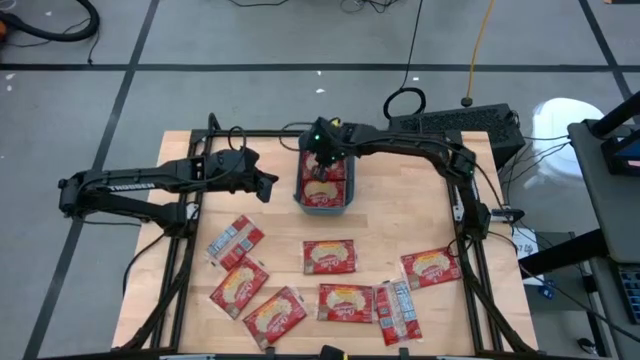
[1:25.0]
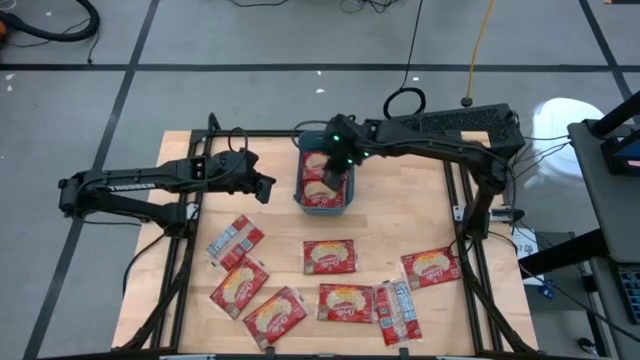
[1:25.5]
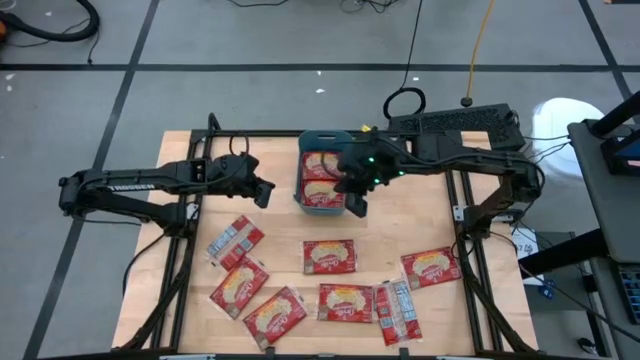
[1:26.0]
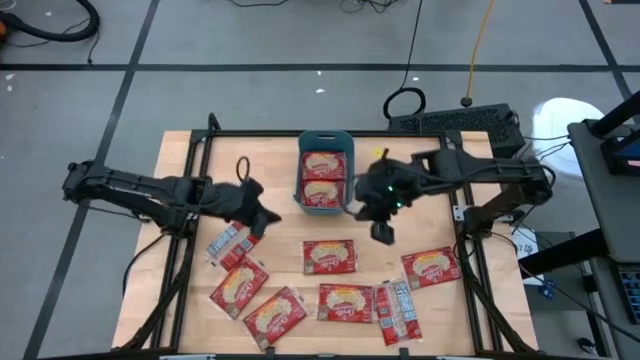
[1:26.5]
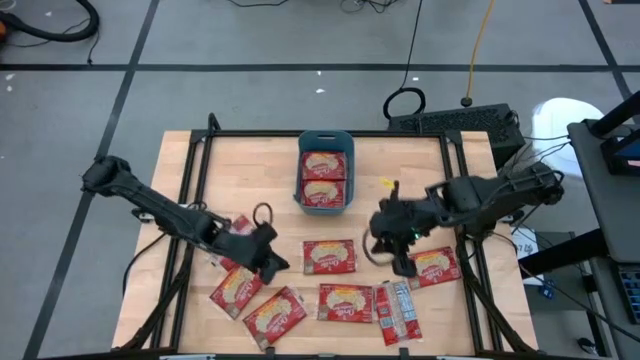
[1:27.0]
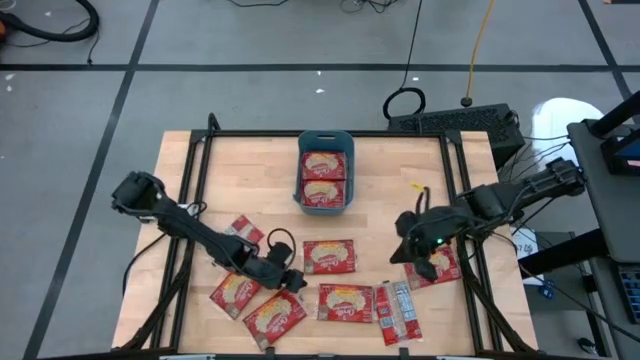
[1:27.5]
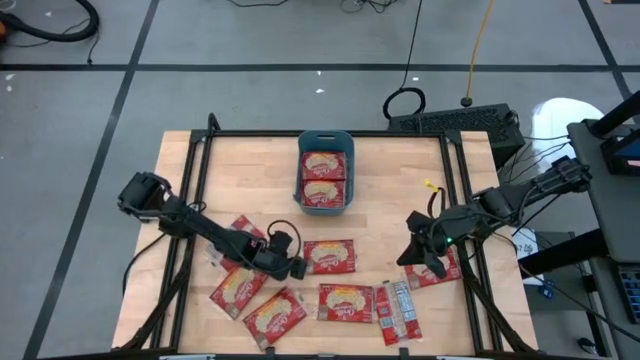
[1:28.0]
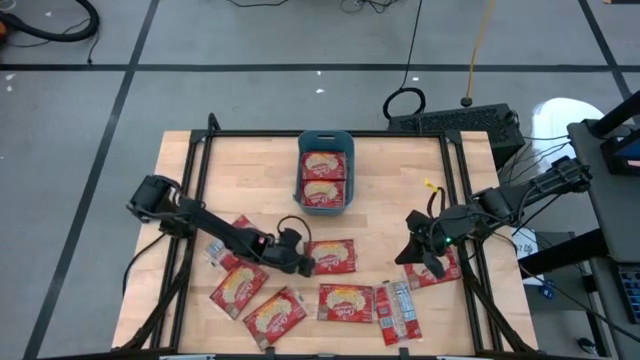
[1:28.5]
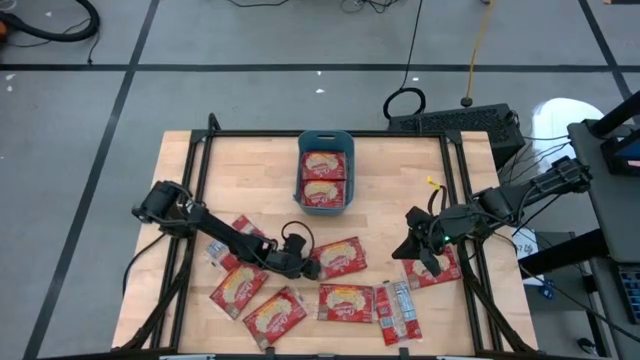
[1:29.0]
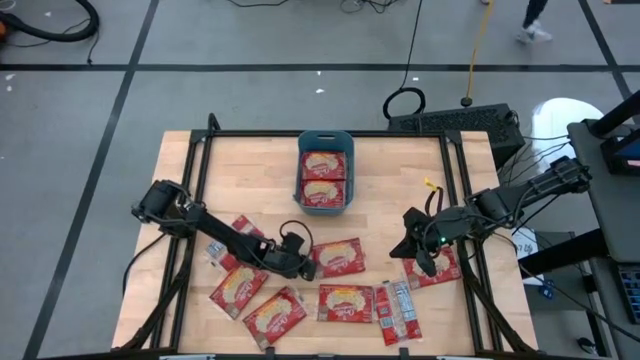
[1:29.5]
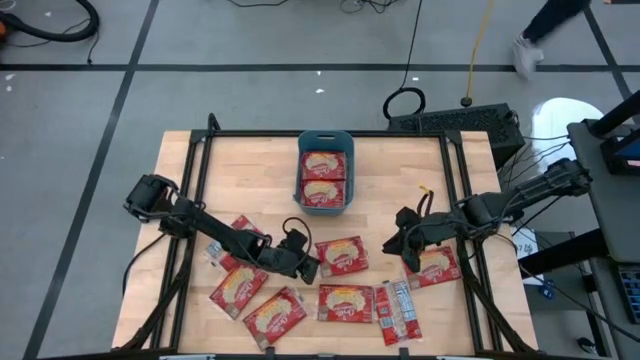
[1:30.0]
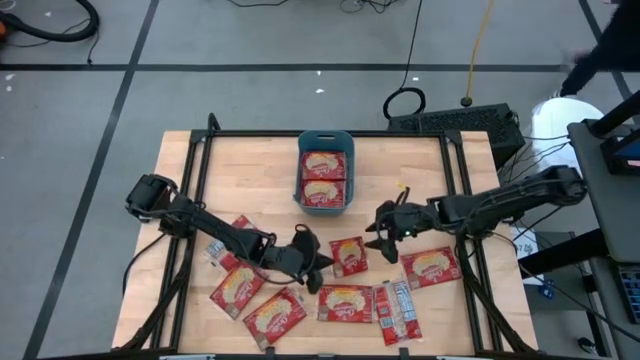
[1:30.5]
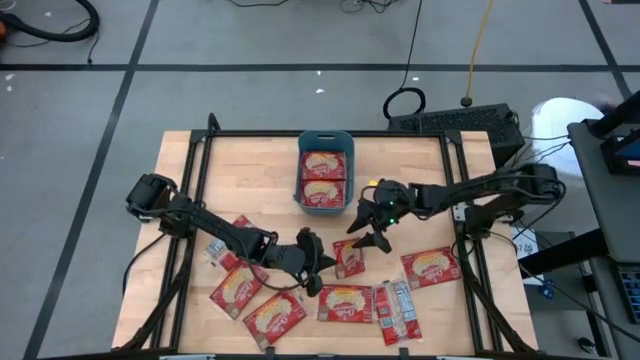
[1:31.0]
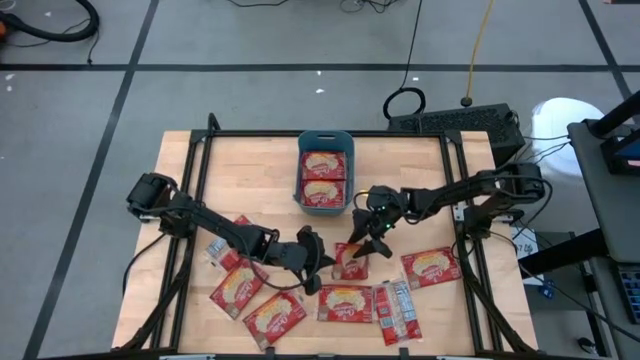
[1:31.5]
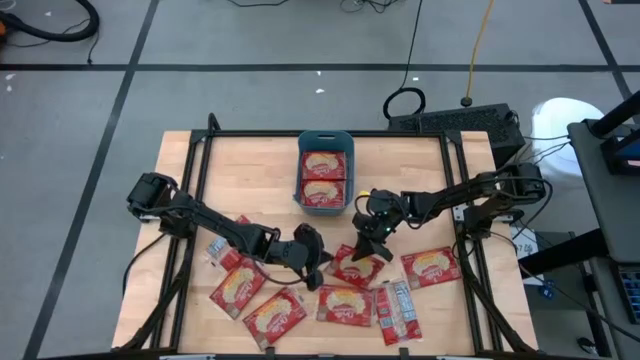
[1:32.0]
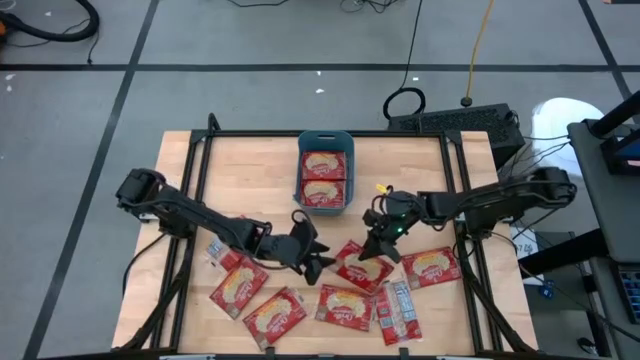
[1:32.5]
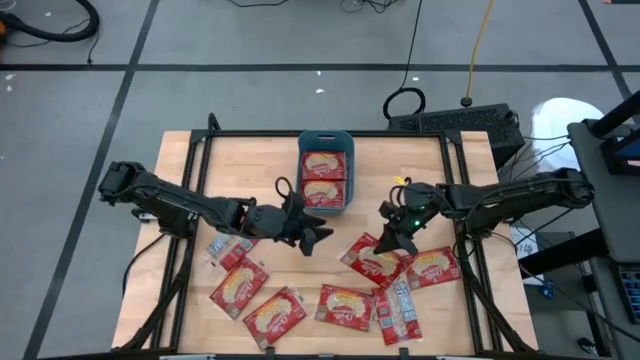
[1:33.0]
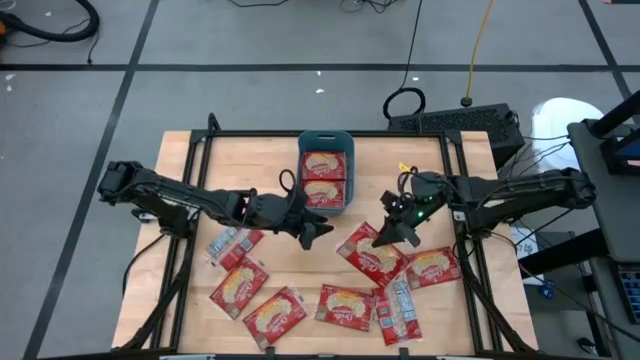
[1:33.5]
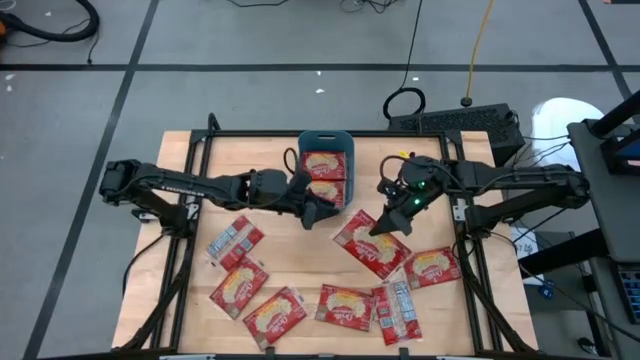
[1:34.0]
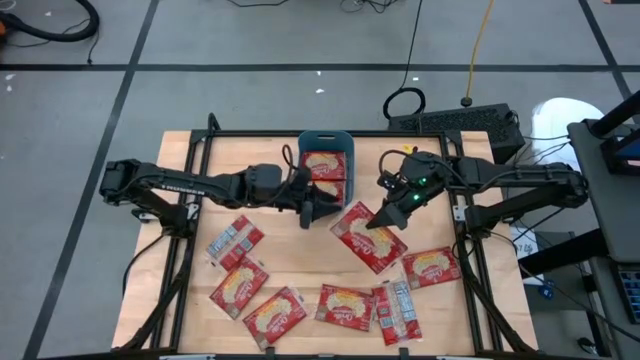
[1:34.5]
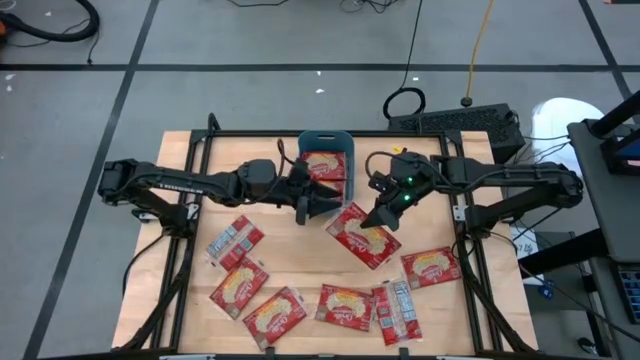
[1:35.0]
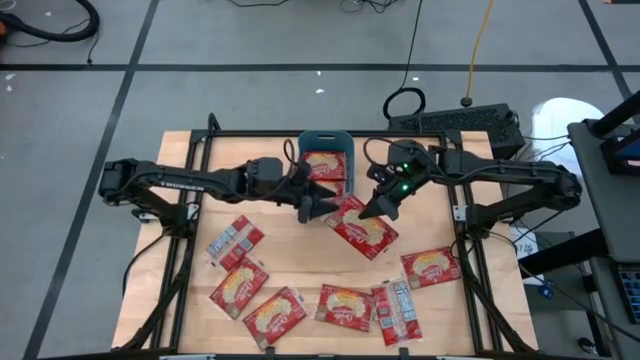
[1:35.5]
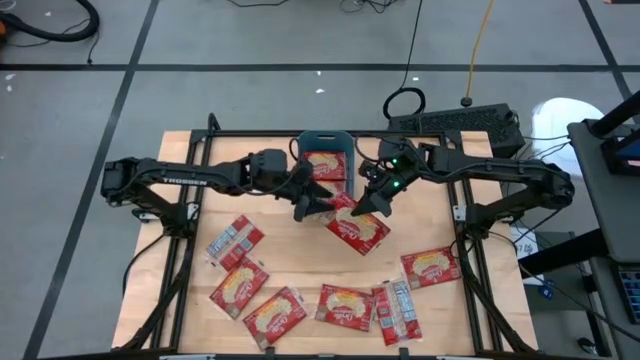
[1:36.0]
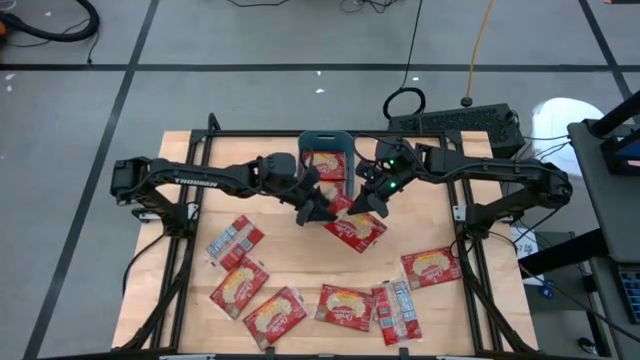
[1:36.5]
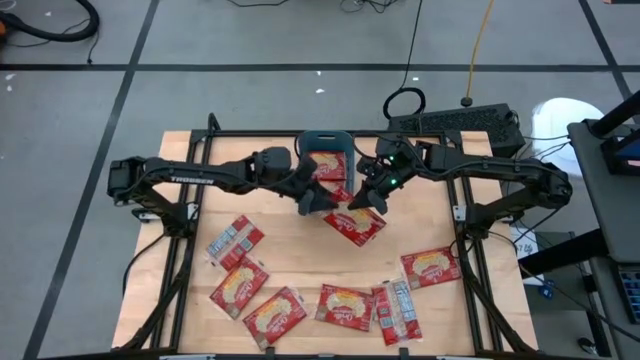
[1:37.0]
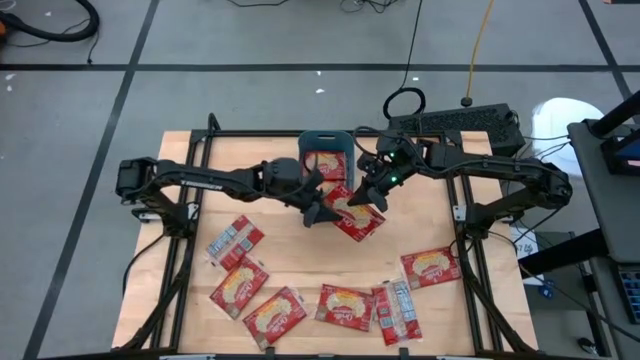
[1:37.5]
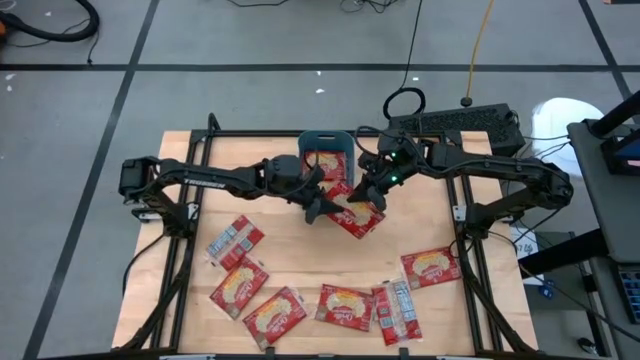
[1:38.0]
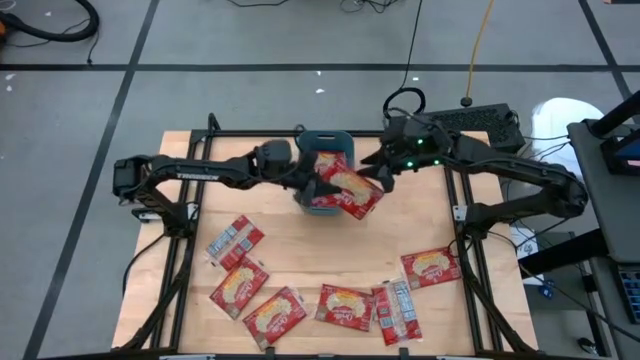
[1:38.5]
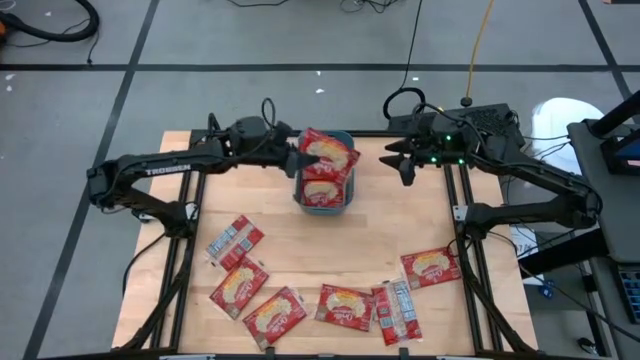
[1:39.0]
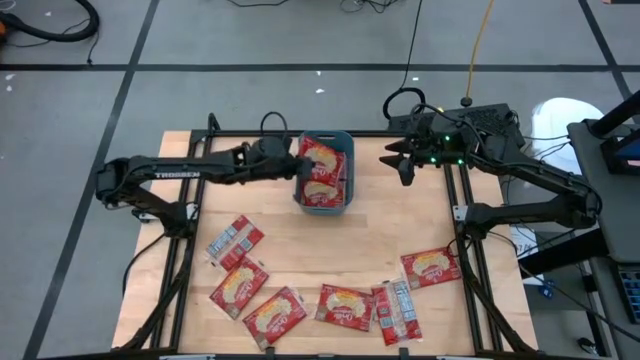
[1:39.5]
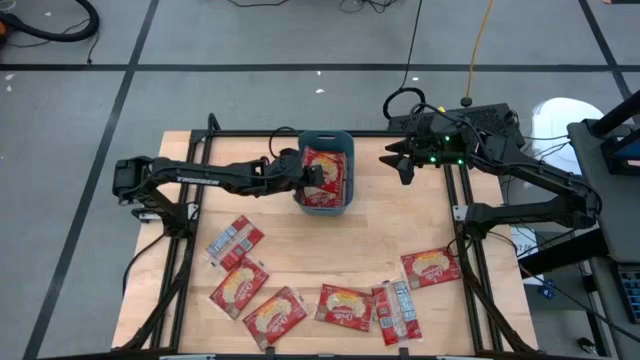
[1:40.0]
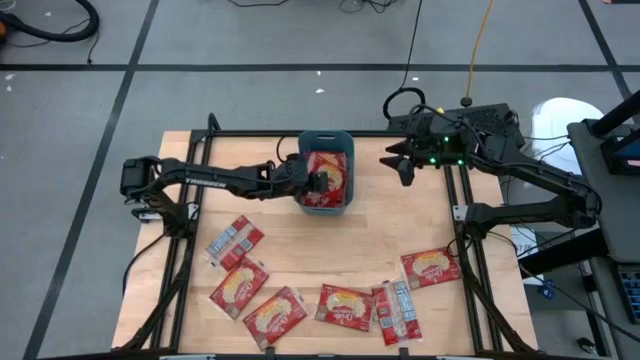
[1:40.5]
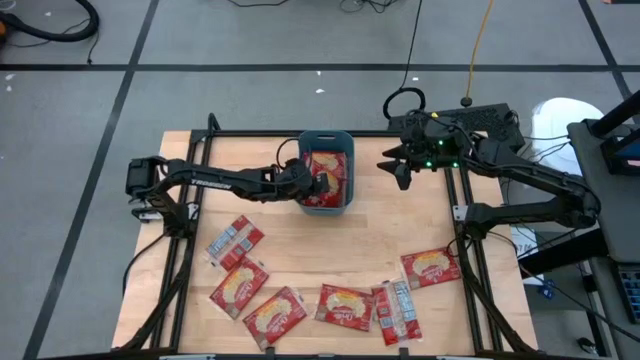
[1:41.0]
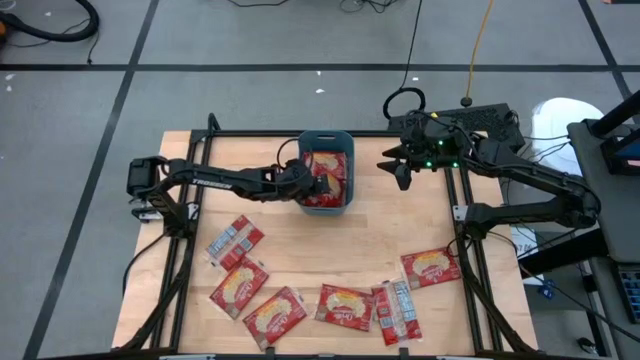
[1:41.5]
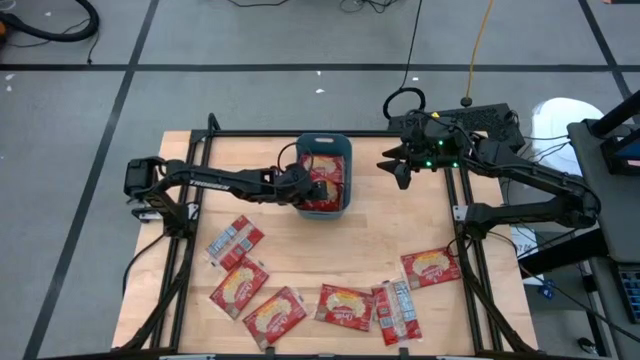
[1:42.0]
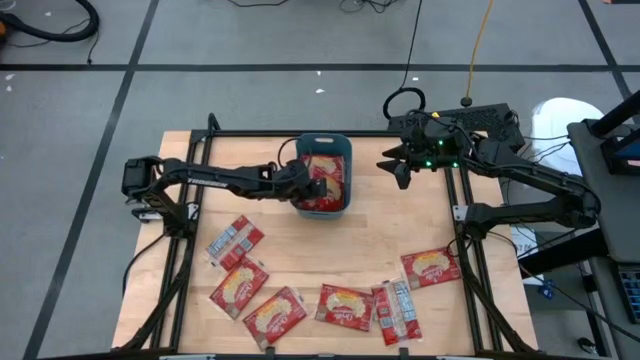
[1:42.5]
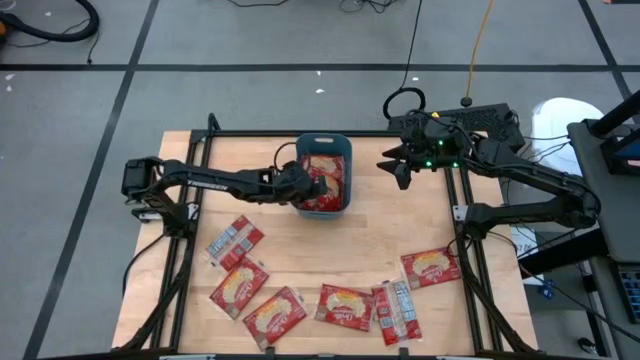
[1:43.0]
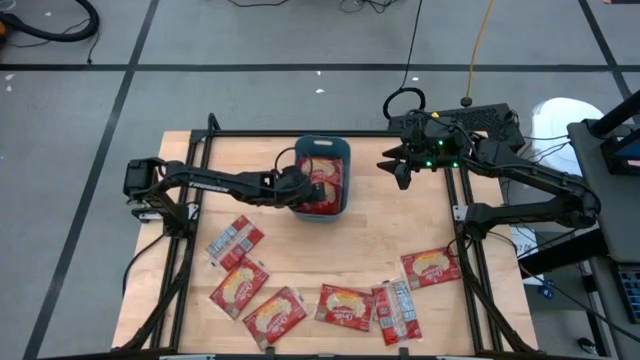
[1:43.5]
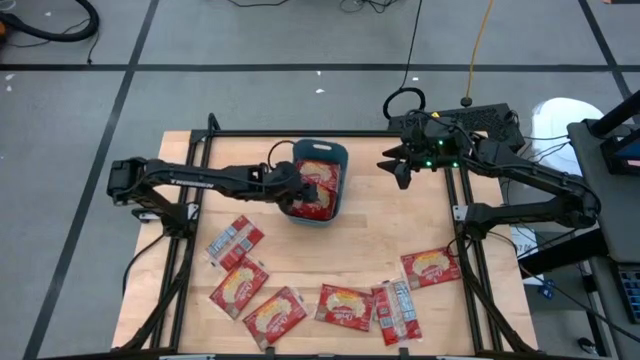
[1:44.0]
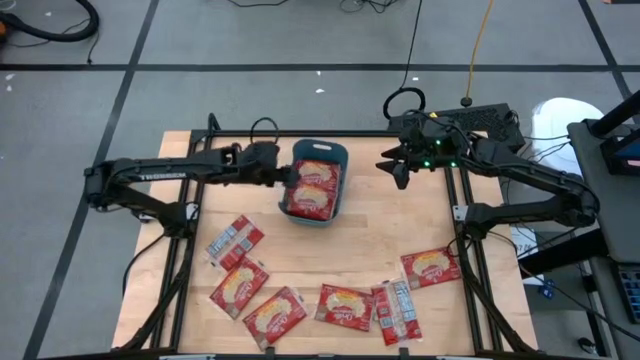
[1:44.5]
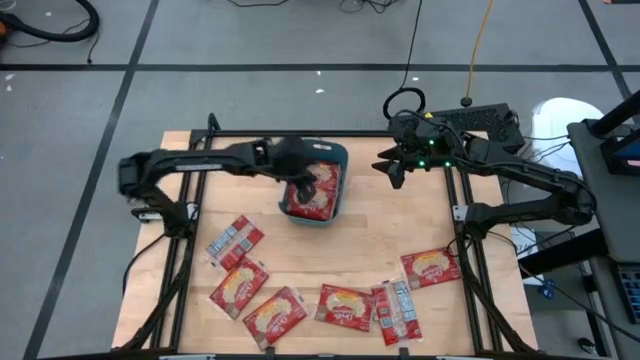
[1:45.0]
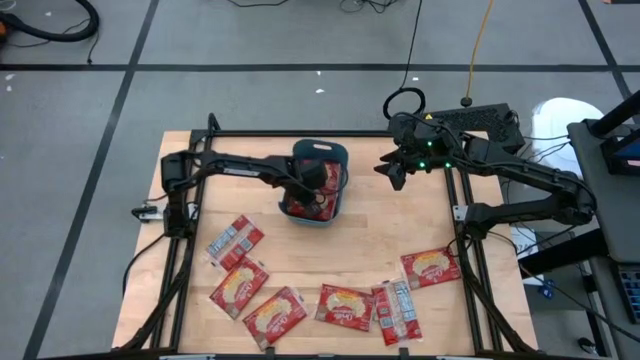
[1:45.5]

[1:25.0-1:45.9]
Task: Sort popcorn bags into baskets
Put the red popcorn bag into the blue bin

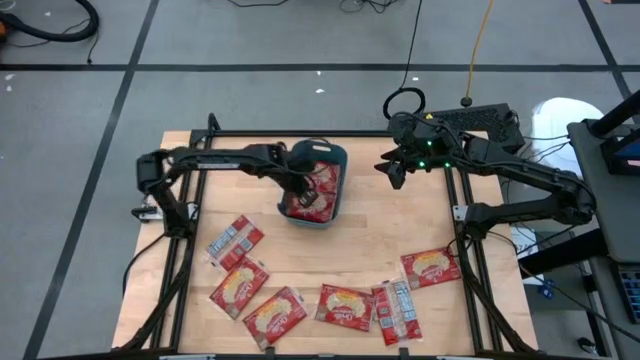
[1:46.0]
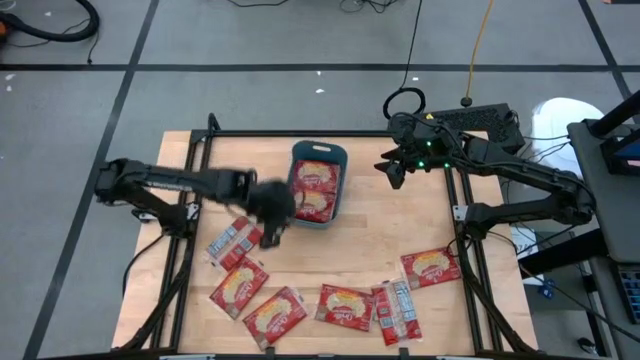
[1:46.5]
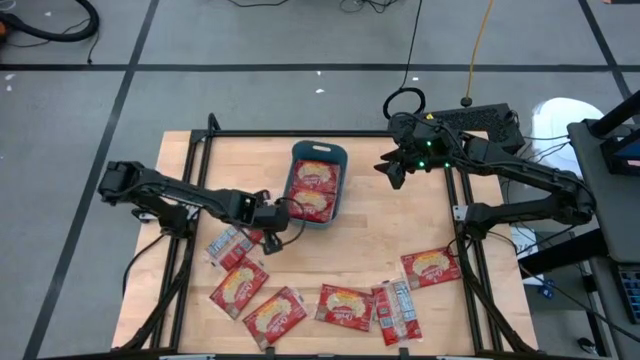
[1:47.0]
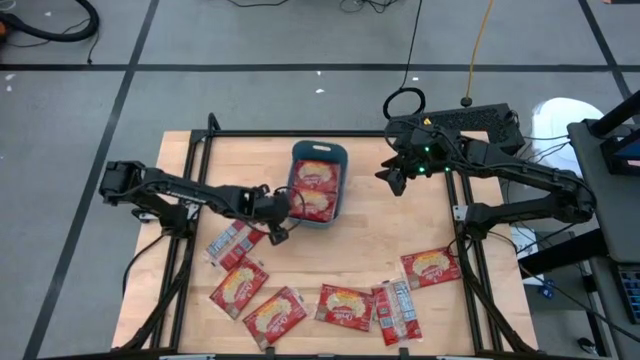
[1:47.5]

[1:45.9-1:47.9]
Adjust the blue bin
